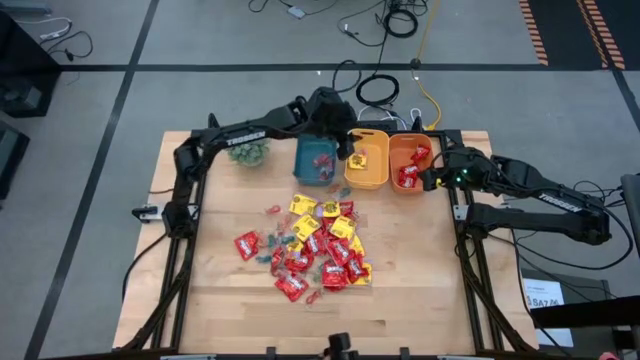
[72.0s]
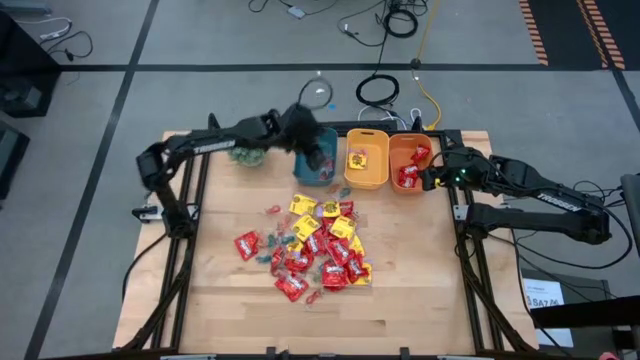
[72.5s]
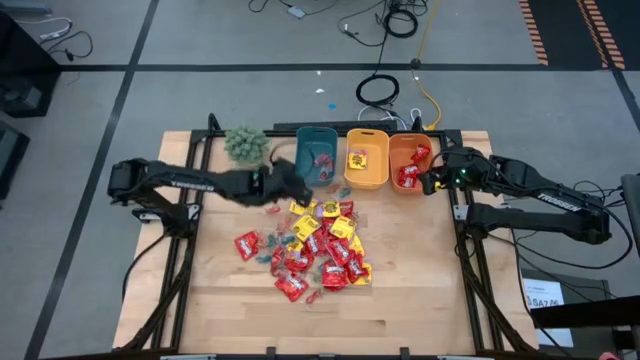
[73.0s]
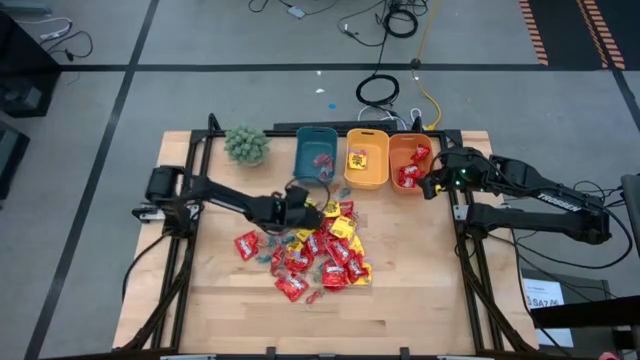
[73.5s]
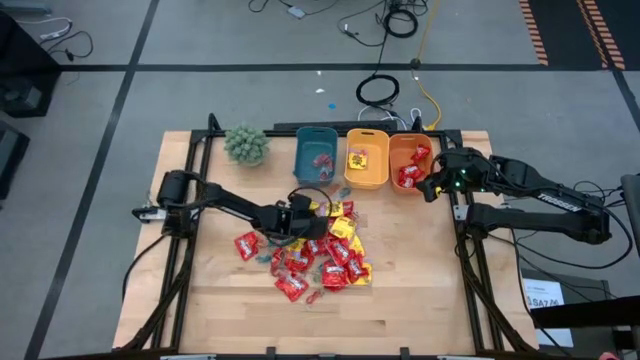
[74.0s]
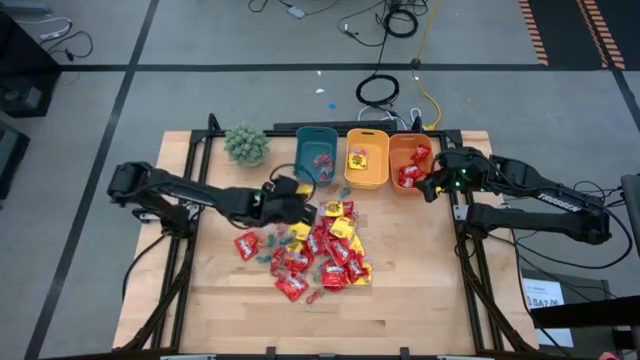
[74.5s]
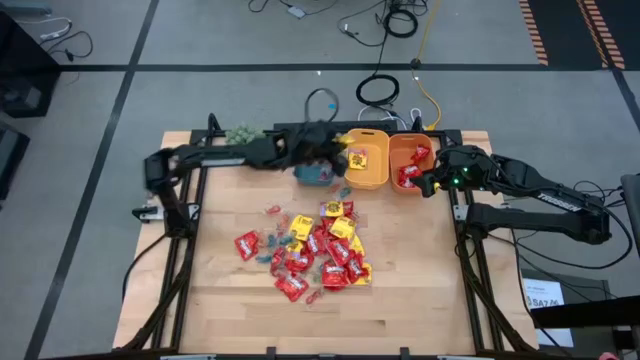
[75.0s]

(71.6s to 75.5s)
Task: Sort candy
Put the yellow candy into the yellow bin

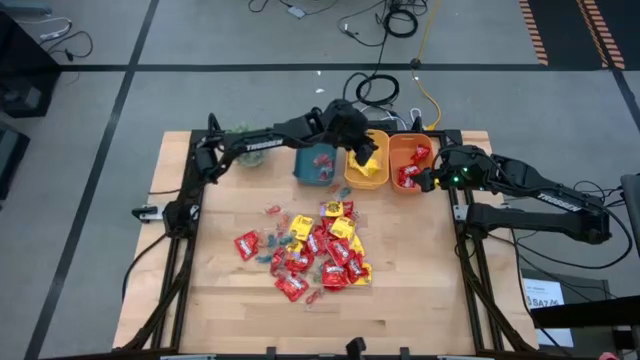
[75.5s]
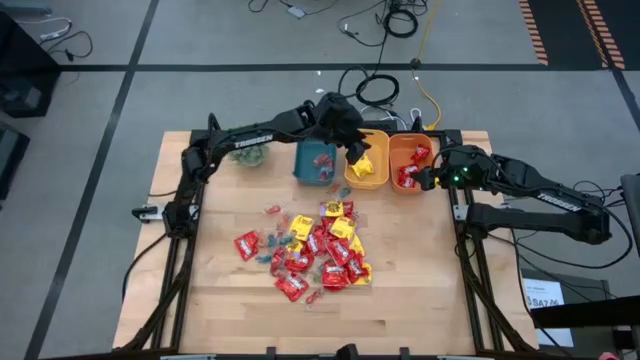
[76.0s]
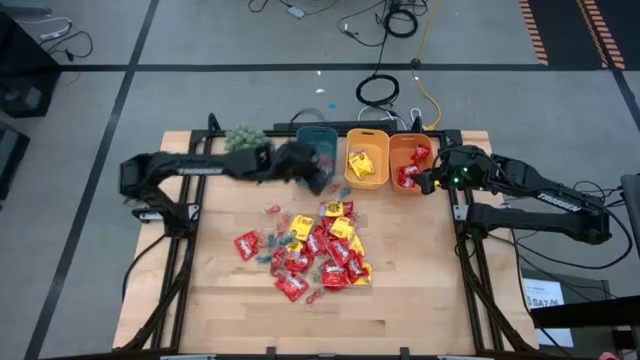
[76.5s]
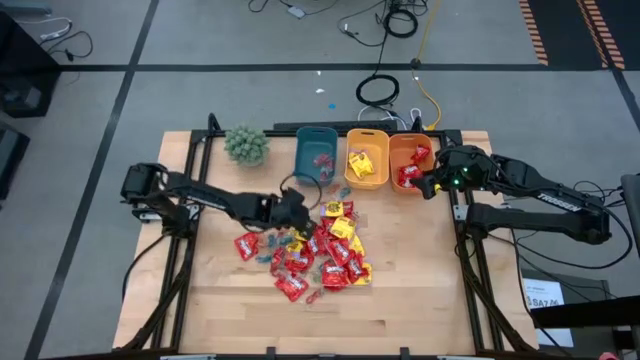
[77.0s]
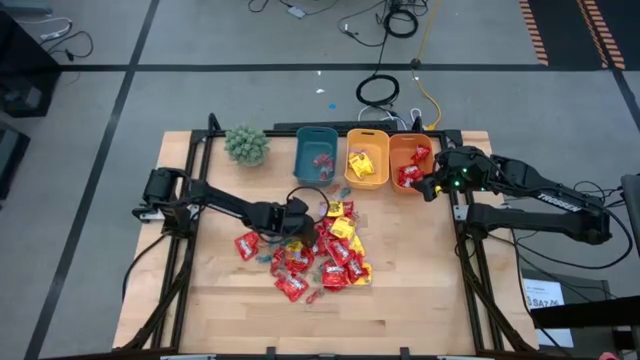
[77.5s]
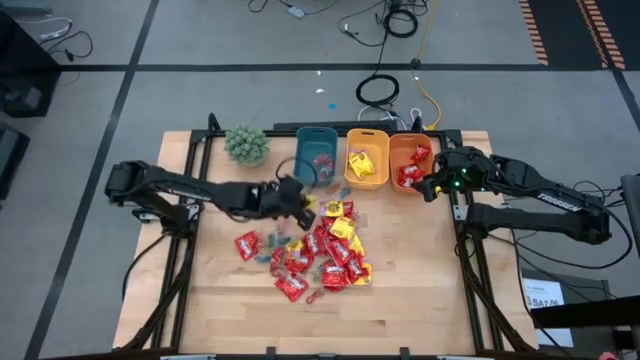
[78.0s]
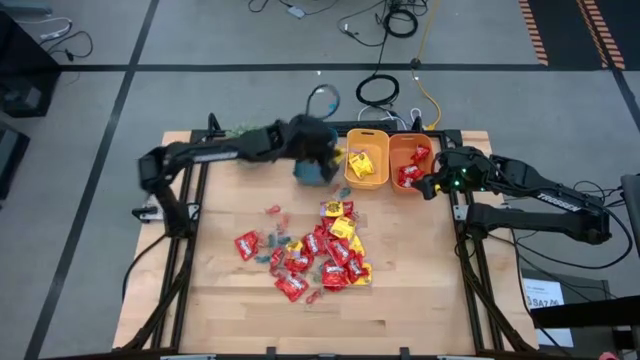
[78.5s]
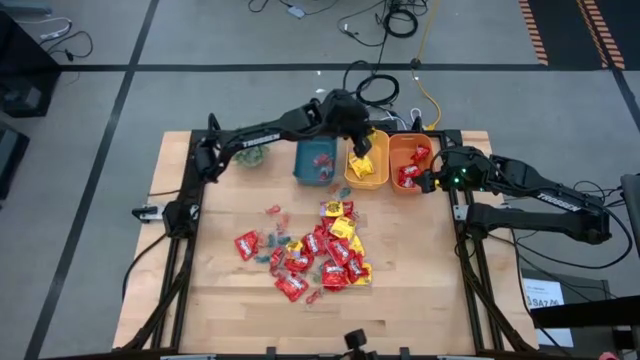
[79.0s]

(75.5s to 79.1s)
Put the yellow candy into the yellow bin

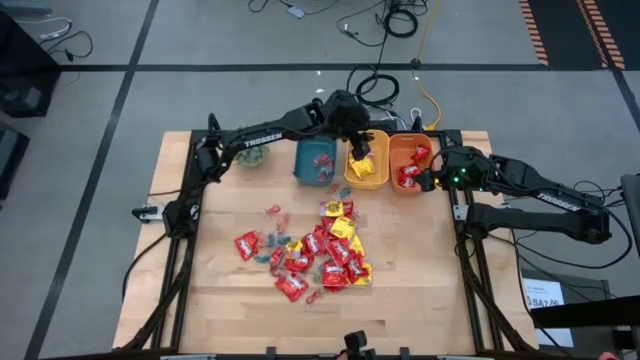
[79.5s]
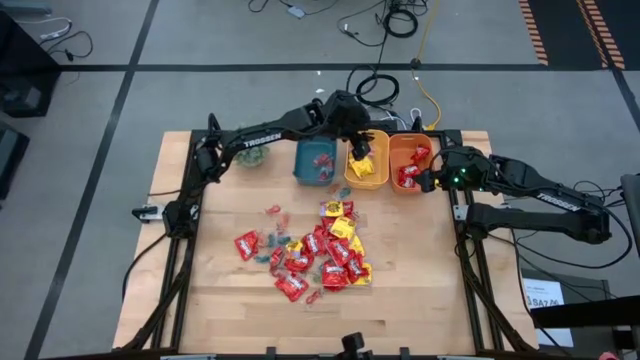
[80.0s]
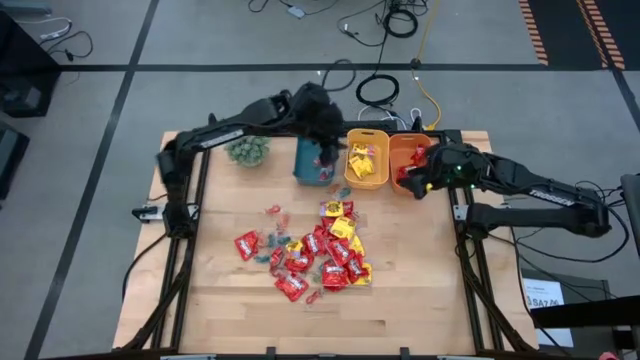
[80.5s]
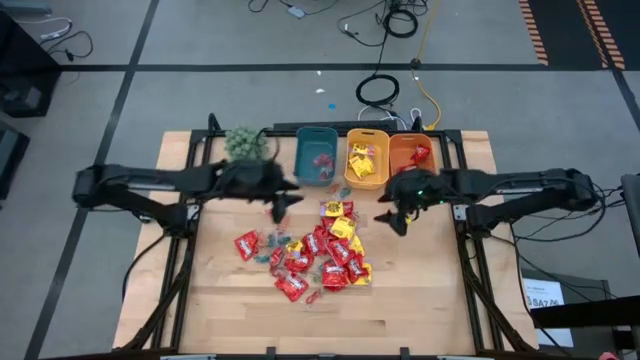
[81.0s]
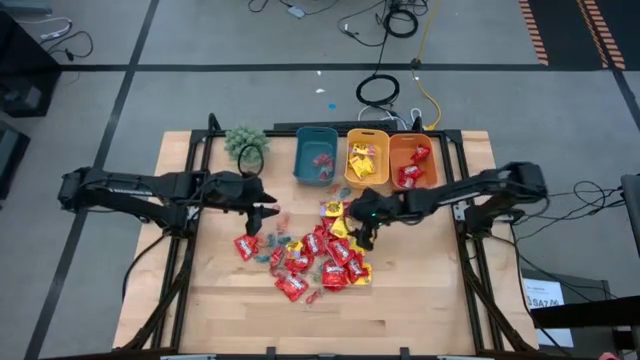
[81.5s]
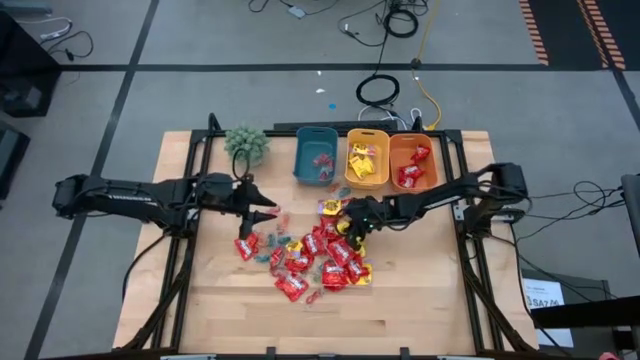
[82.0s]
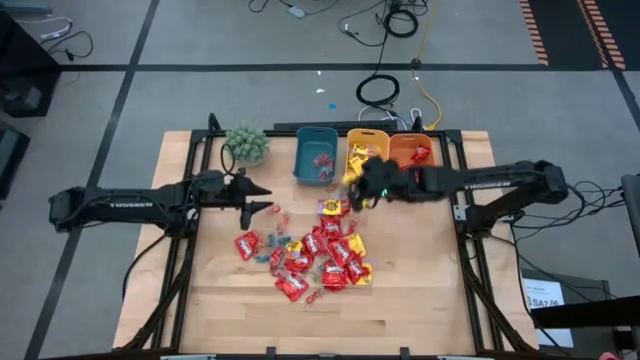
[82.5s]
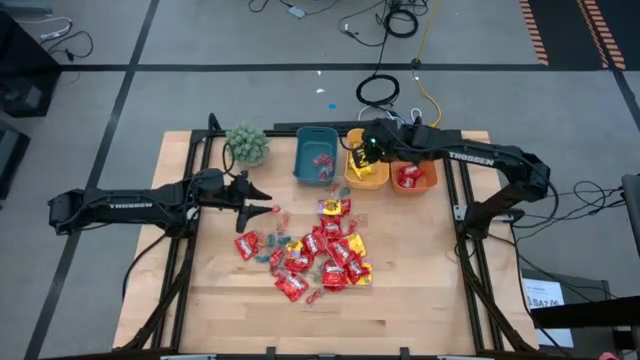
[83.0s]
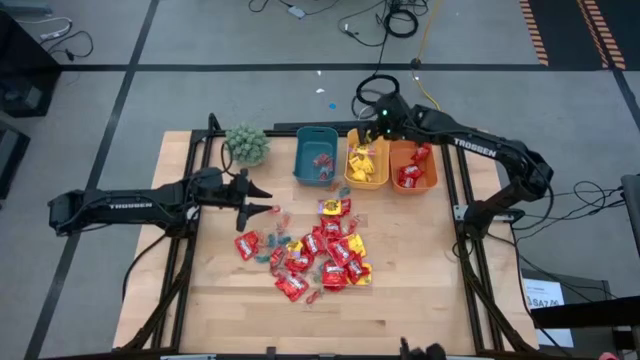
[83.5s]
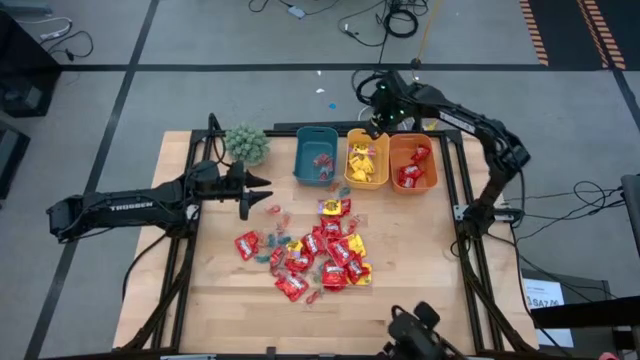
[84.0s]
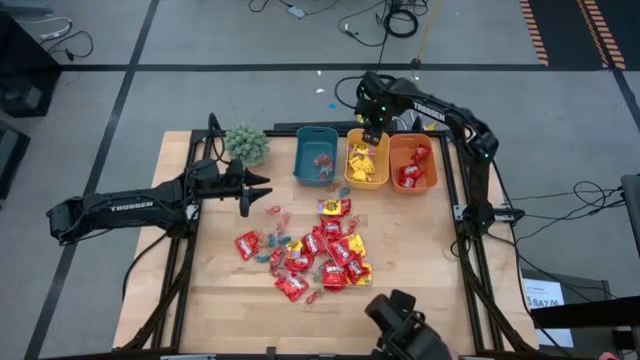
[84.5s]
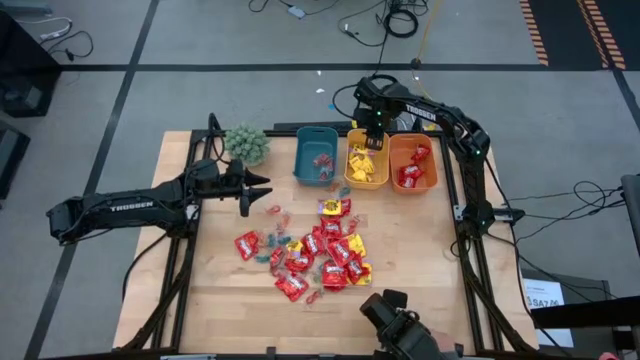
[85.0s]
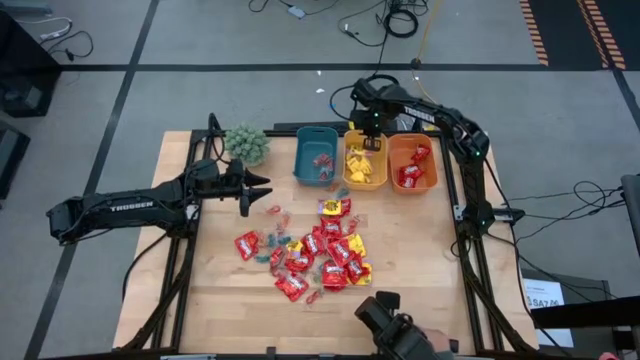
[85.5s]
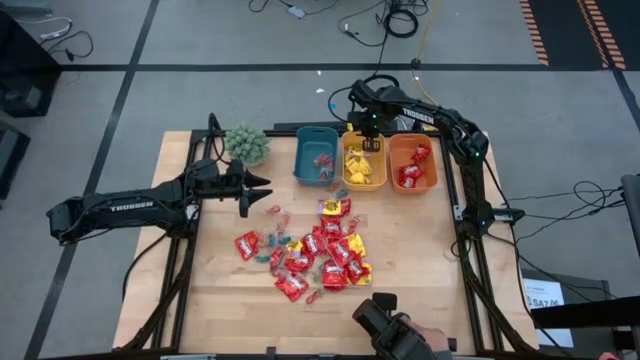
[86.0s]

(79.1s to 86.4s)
Put the yellow candy into the yellow bin

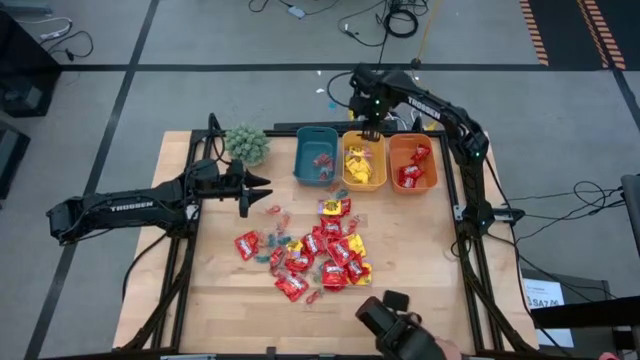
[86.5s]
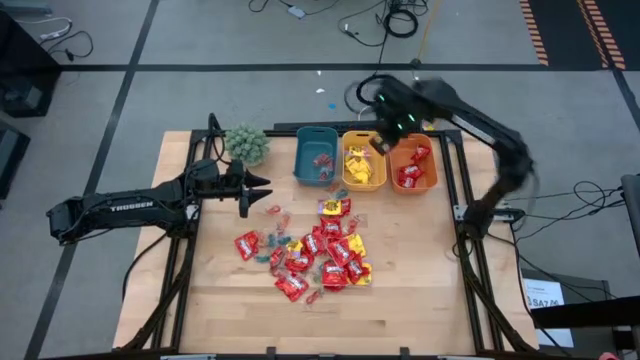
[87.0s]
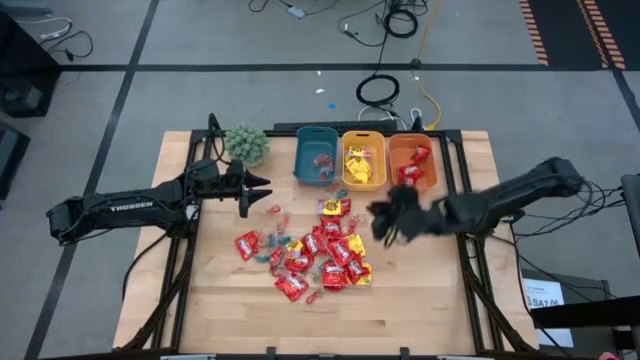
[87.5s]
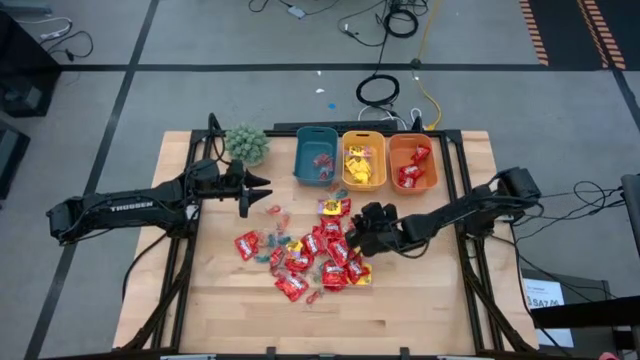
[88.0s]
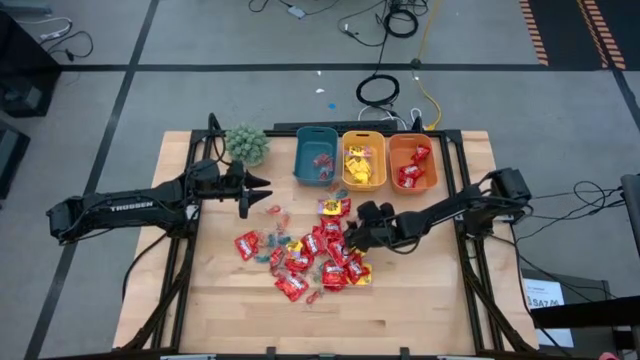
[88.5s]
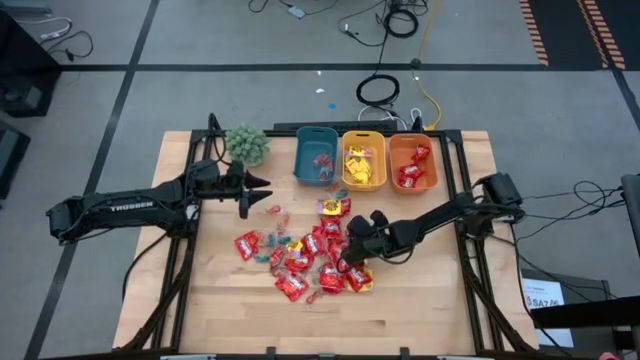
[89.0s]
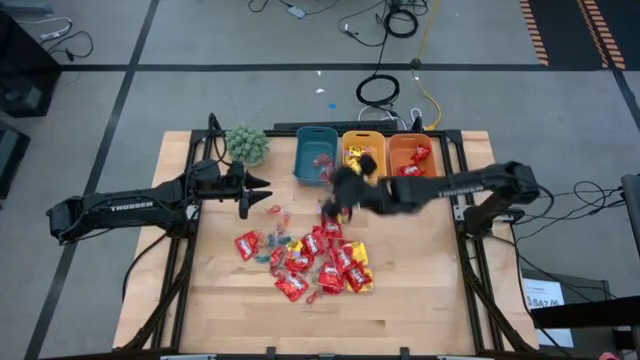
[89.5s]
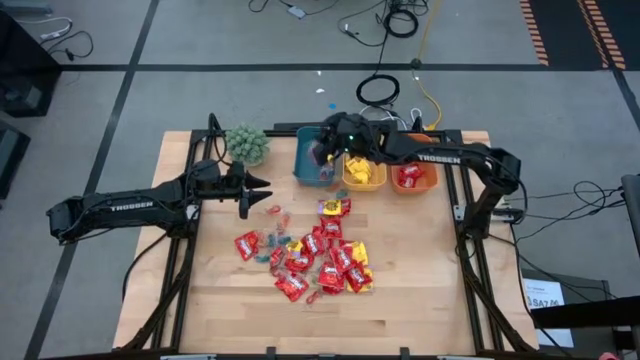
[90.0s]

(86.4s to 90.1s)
Put the orange gummy into the blue bin

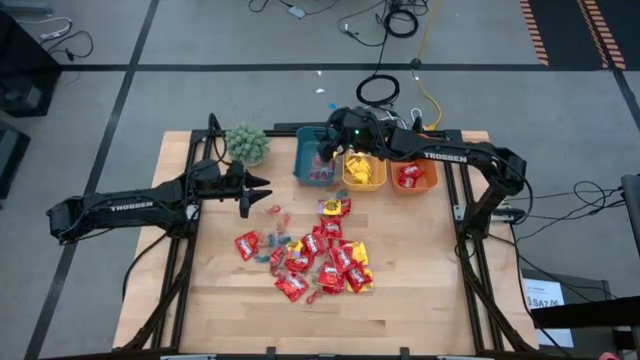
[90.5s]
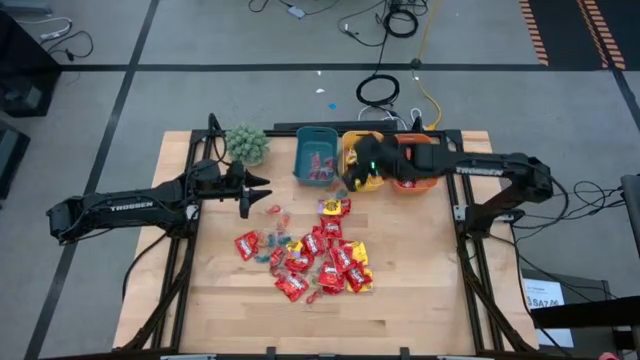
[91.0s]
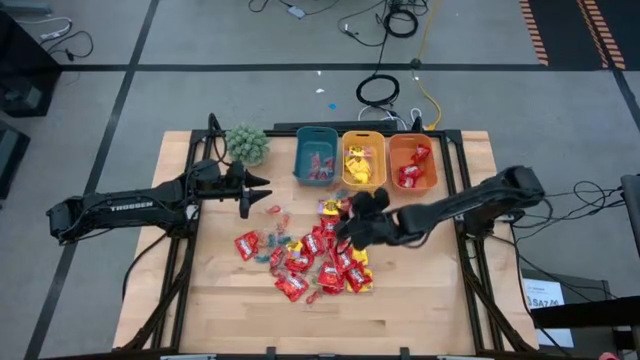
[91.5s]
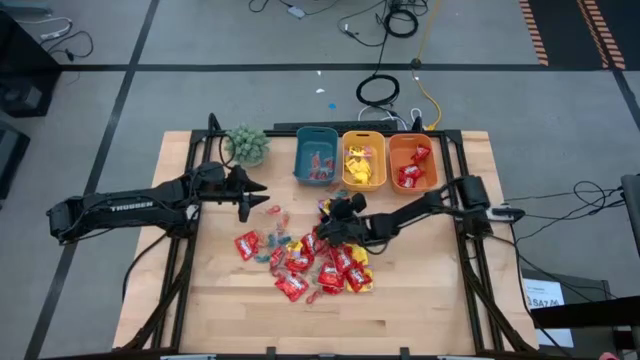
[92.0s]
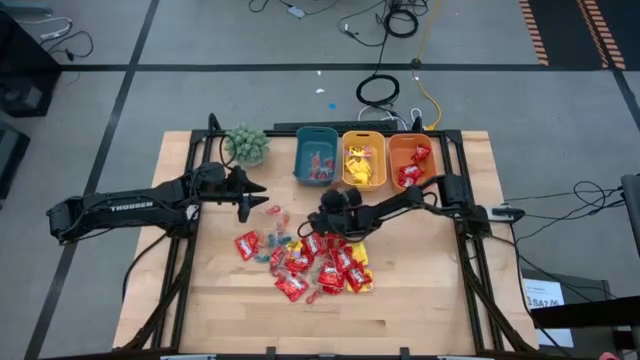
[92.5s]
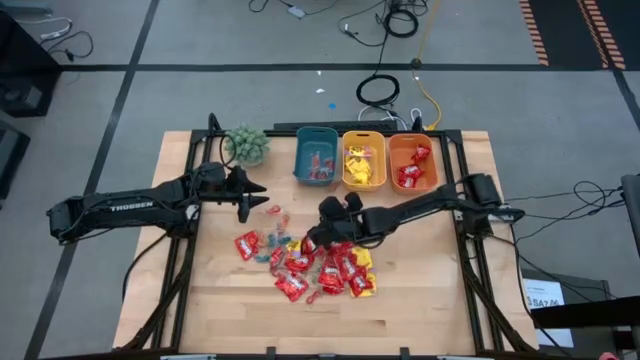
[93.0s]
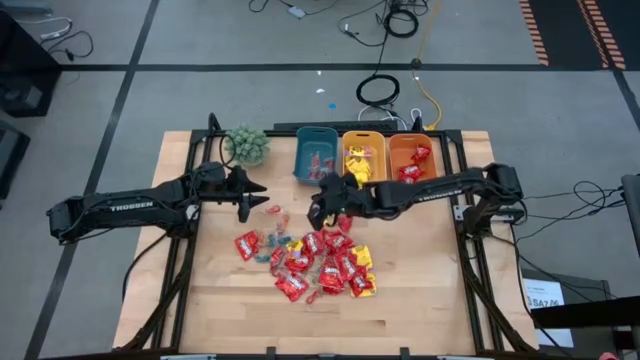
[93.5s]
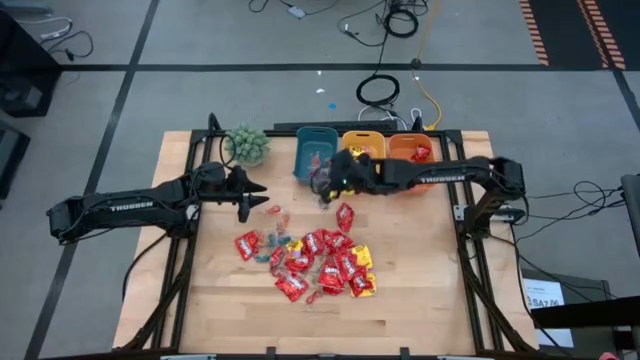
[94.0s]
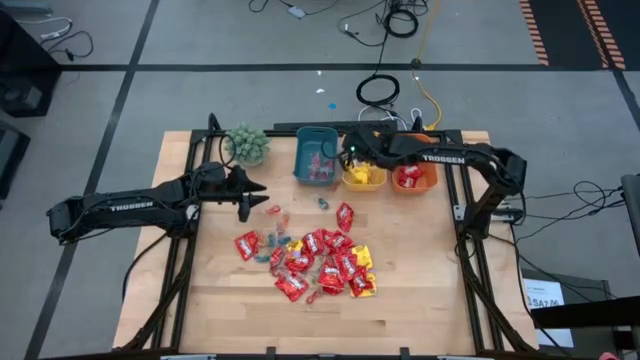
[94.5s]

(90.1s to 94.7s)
Put the yellow candy into the yellow bin
